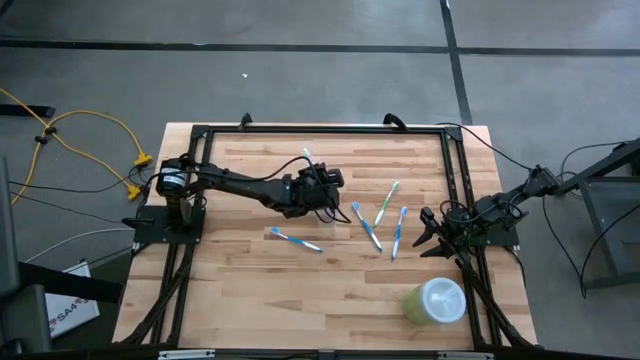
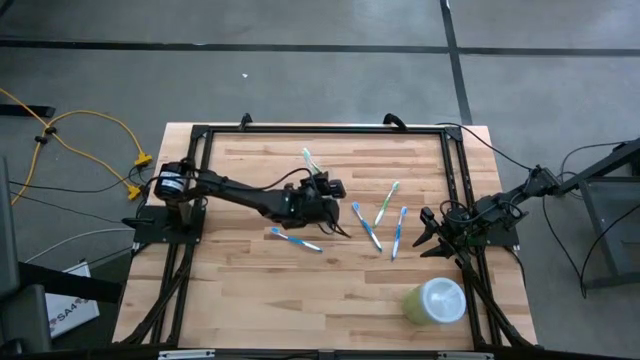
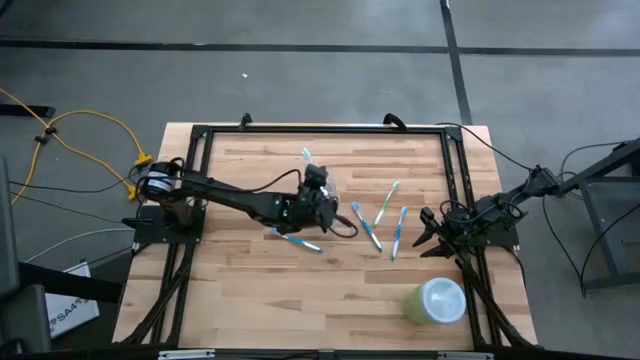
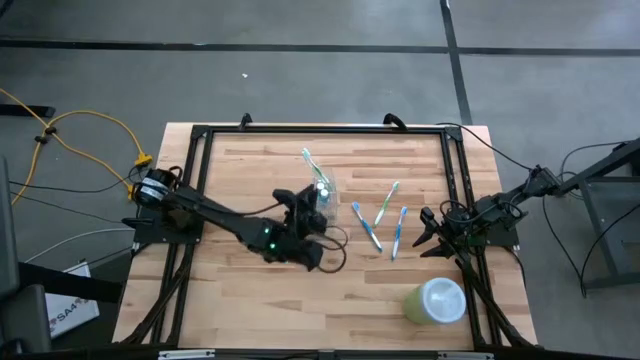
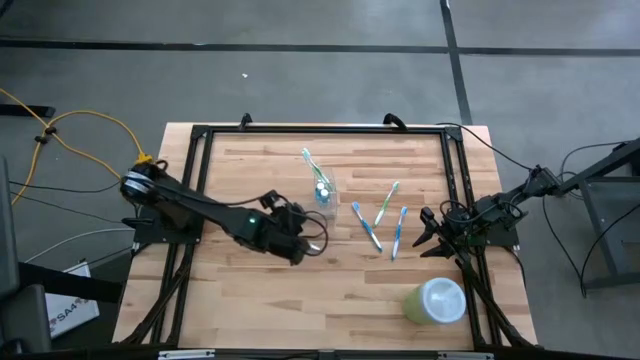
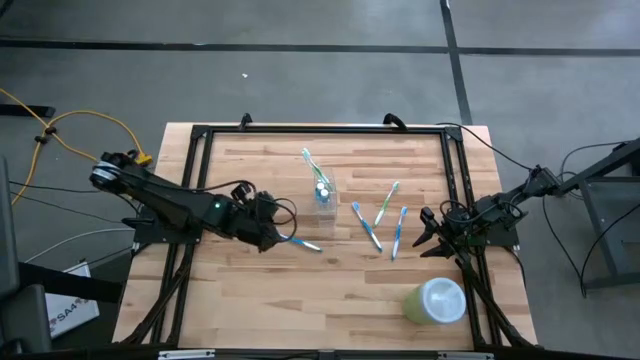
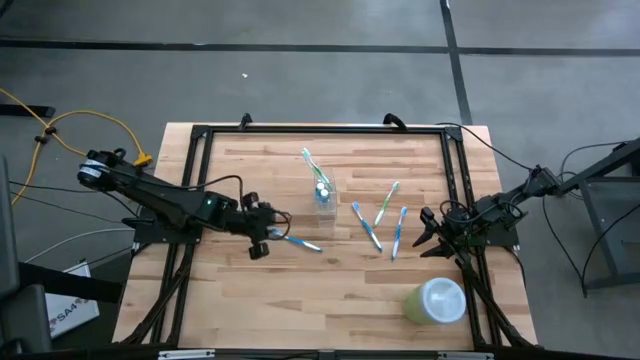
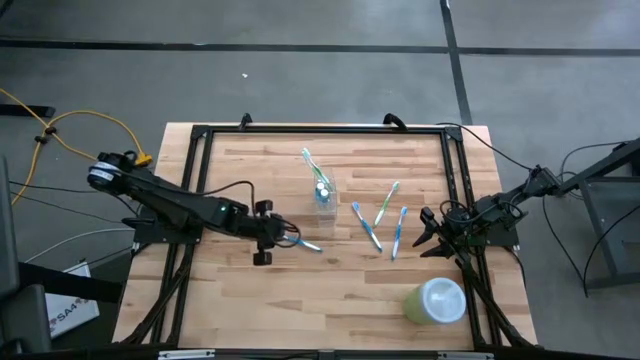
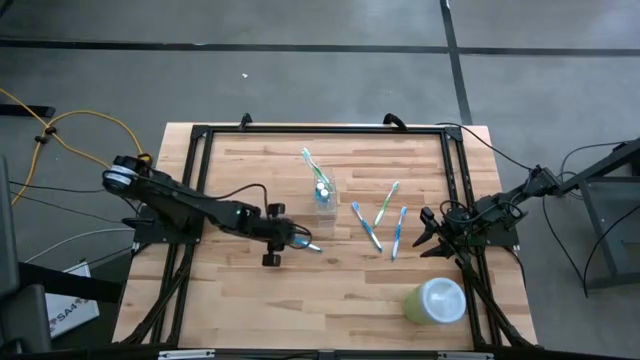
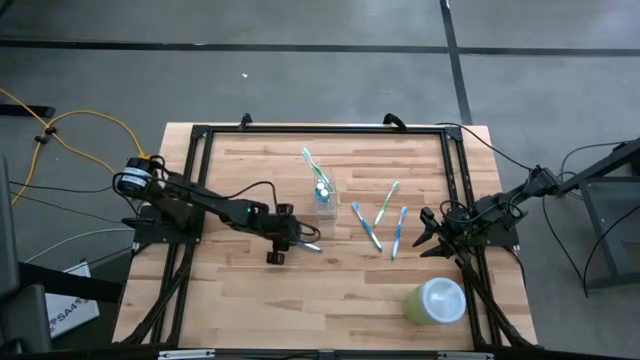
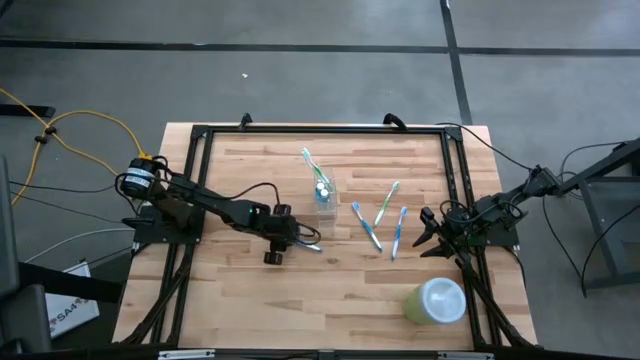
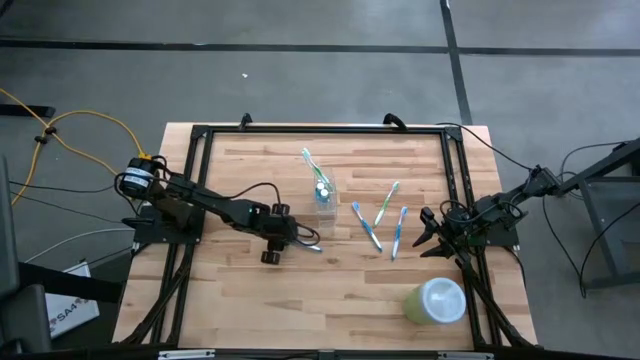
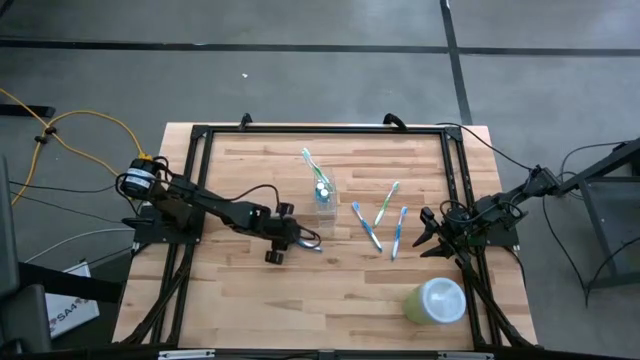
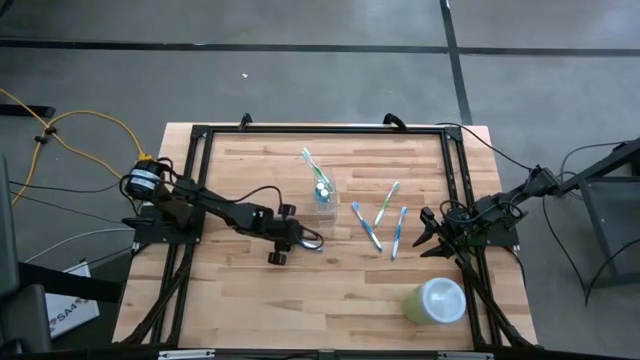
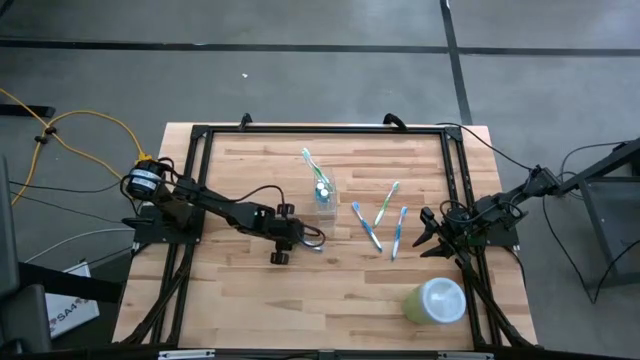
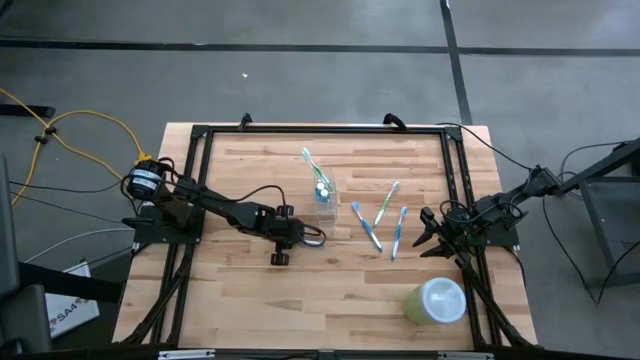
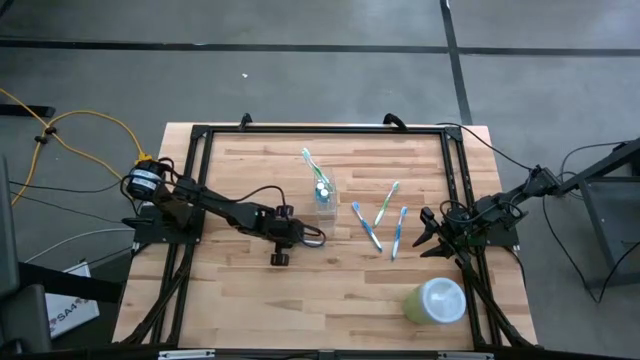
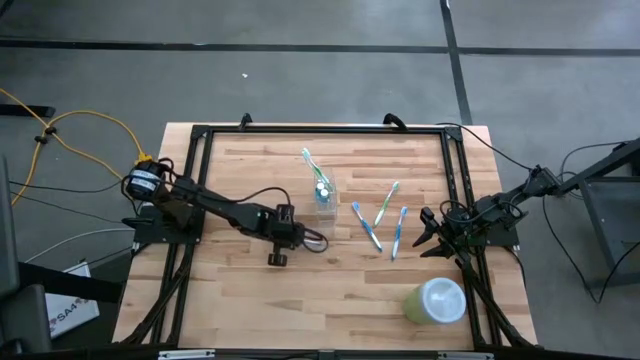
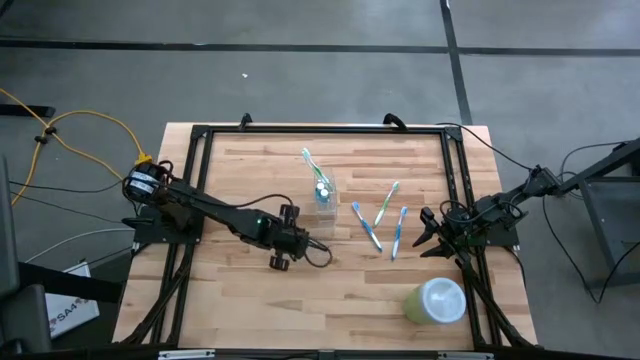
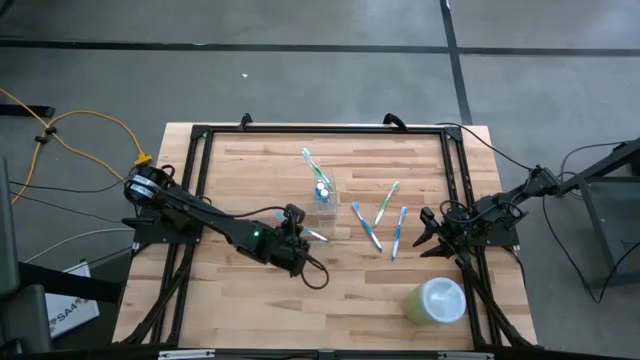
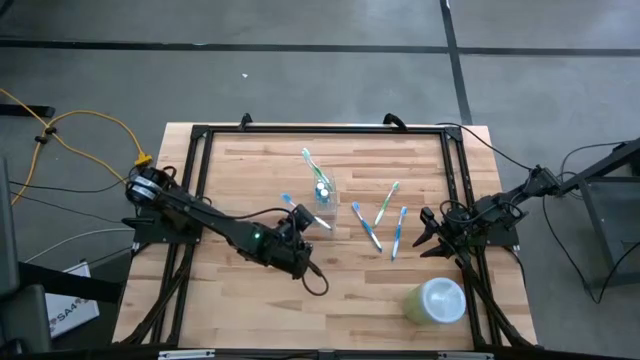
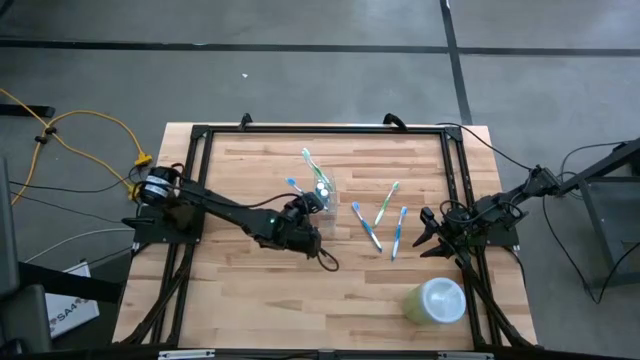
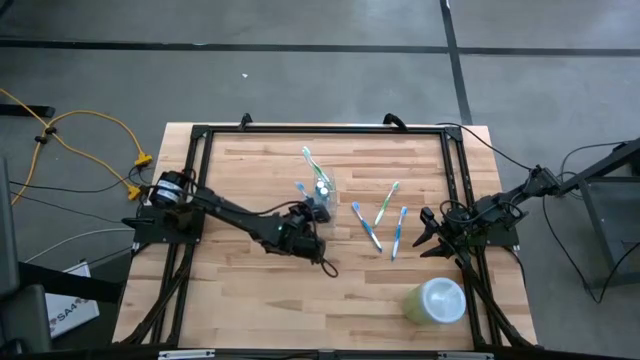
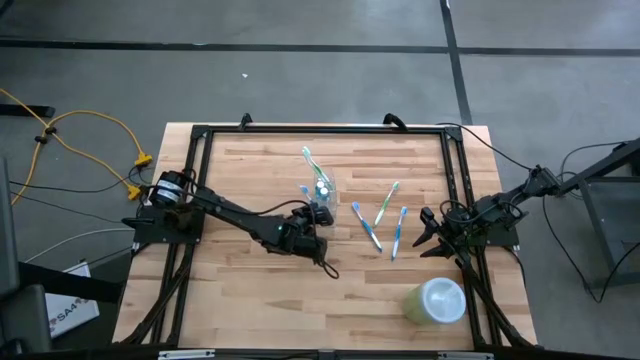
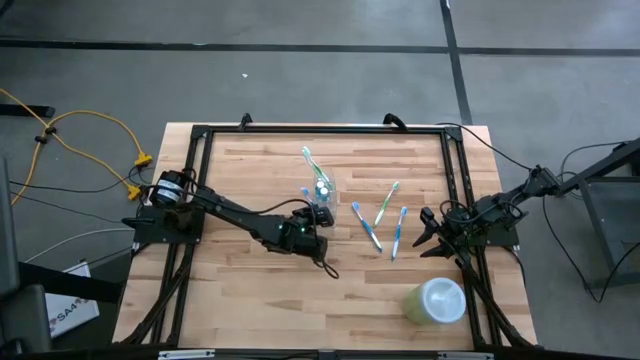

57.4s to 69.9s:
Task: Pick & Place toothbrushing station
Put the left blue toothbrush into the transparent organizer

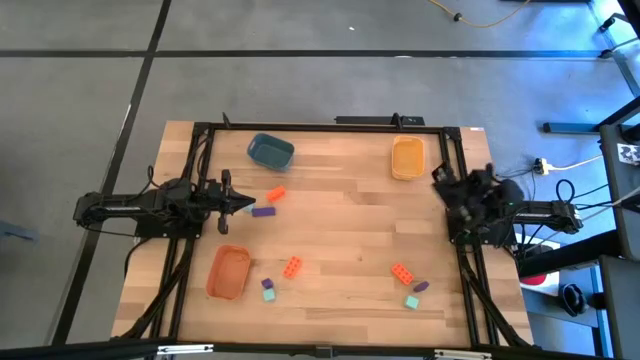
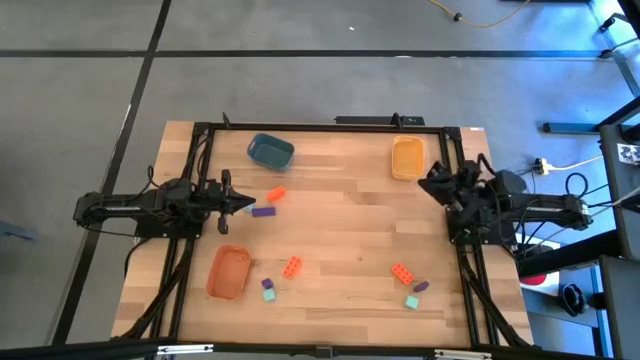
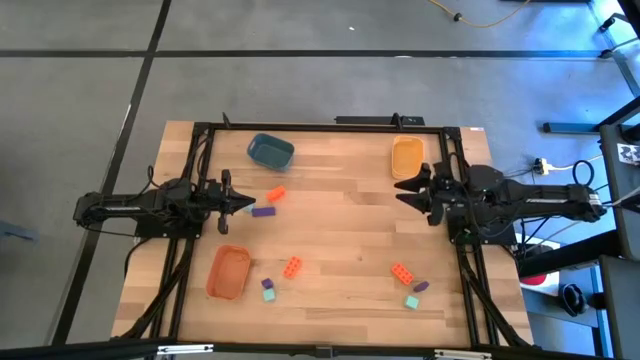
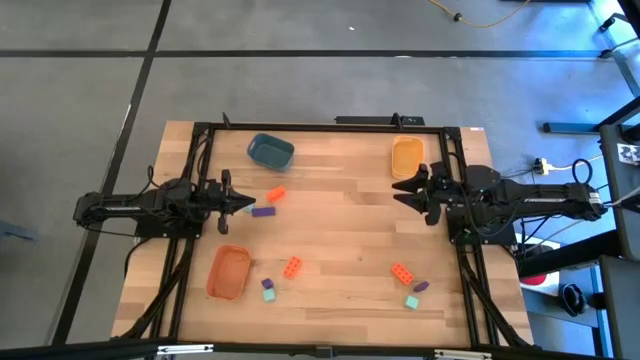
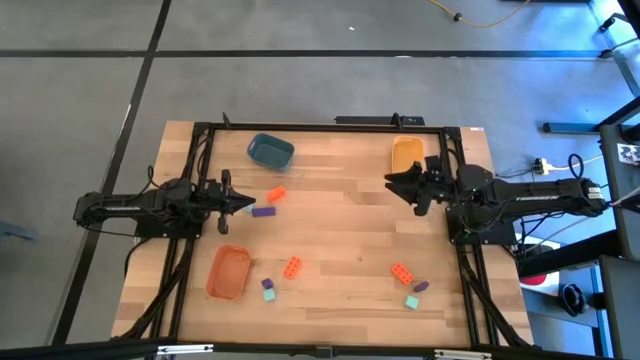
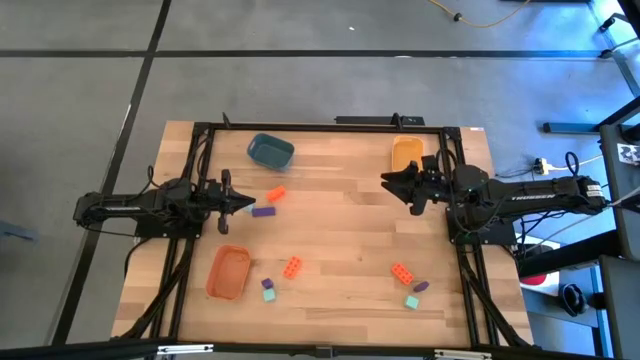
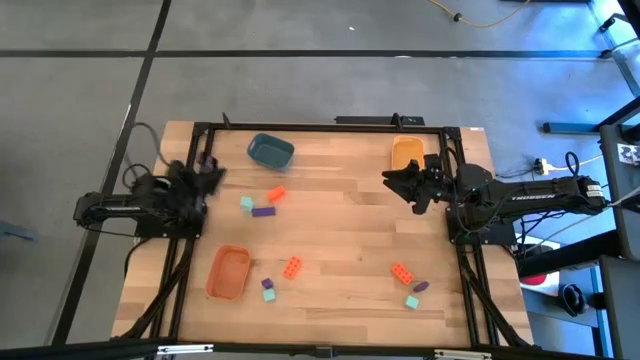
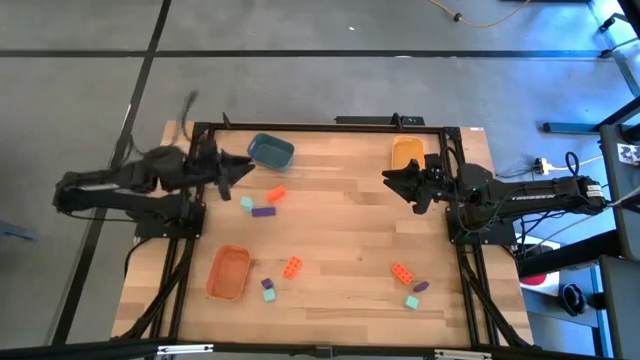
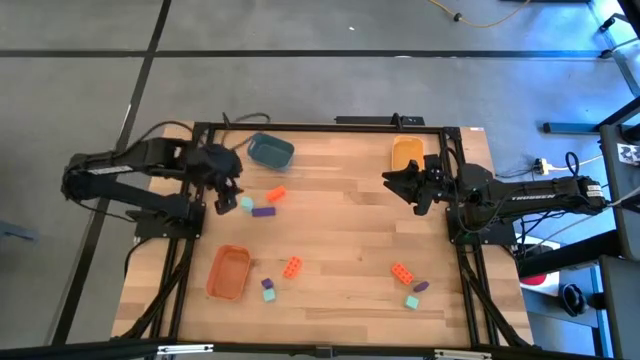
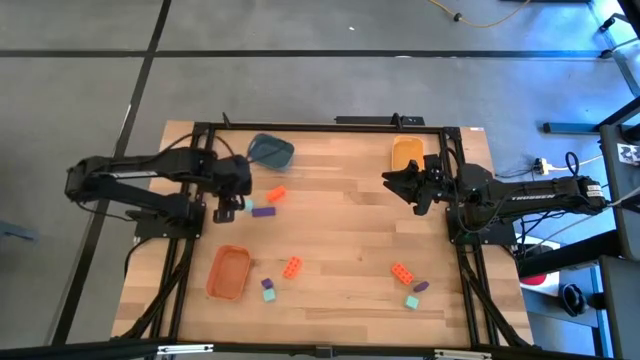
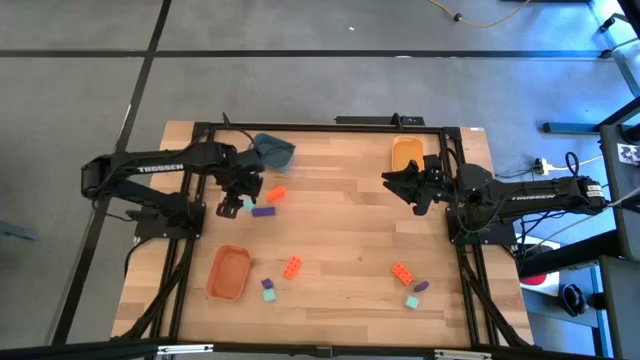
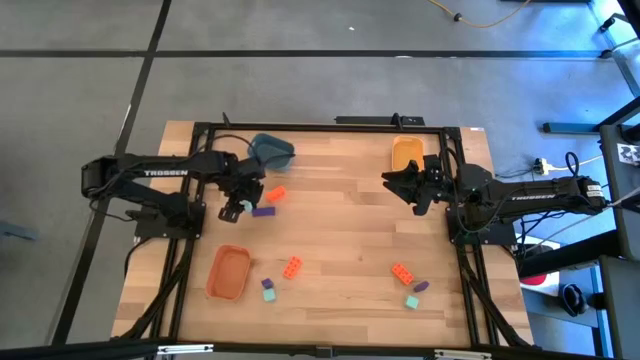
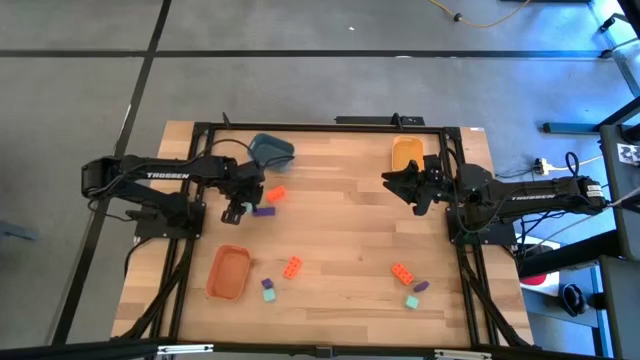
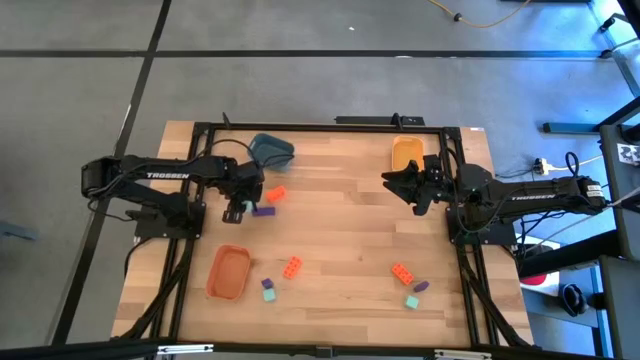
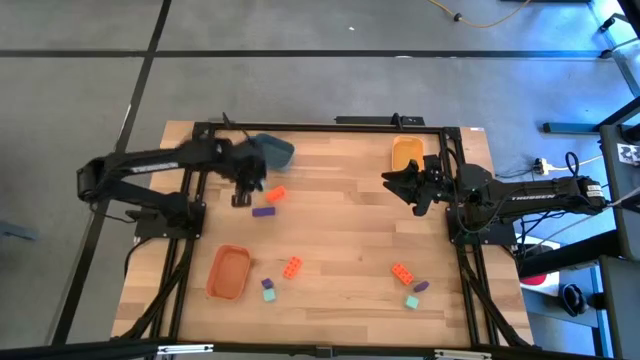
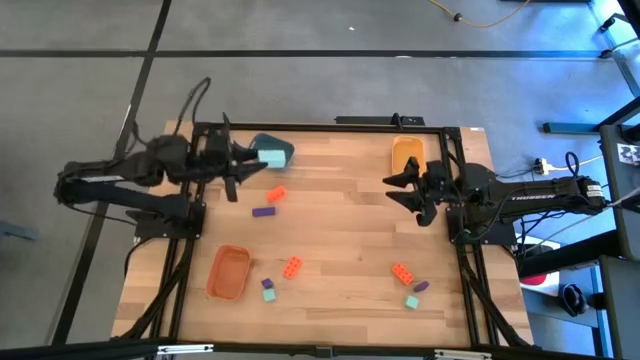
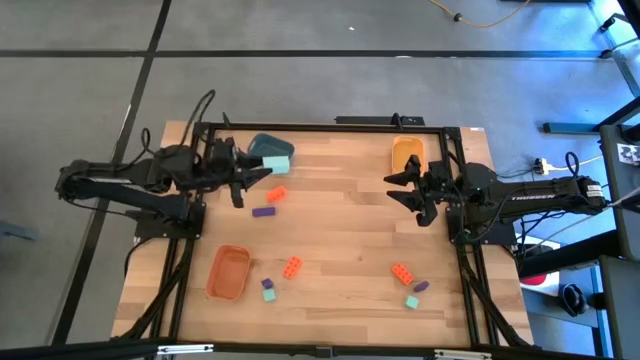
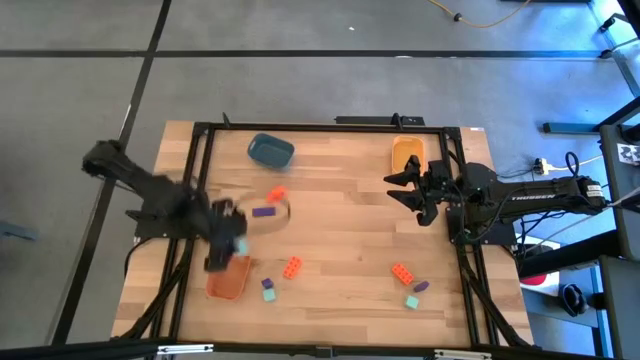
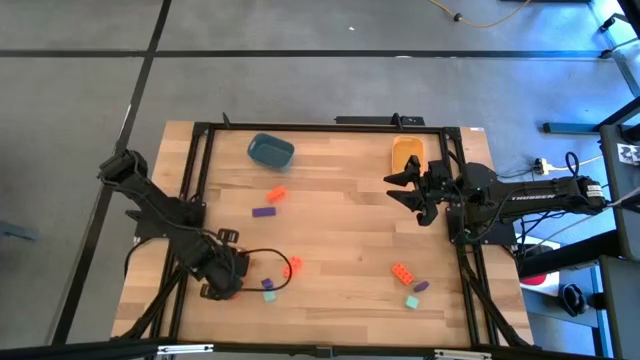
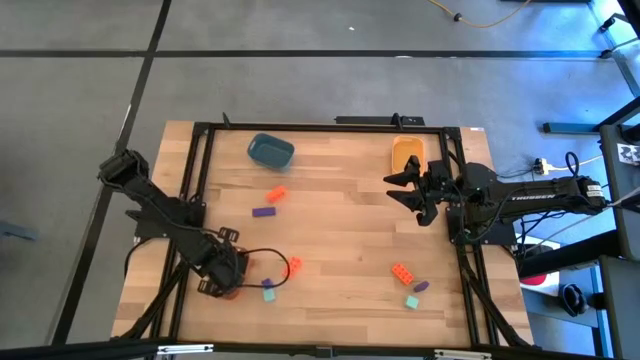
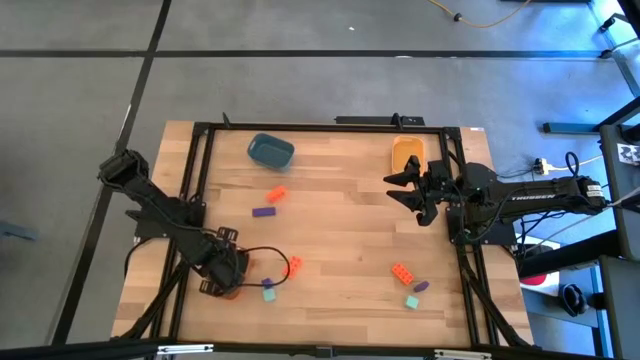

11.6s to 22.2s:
Task: Sort & place blocks by color
Put the top light blue block into the orange bin
